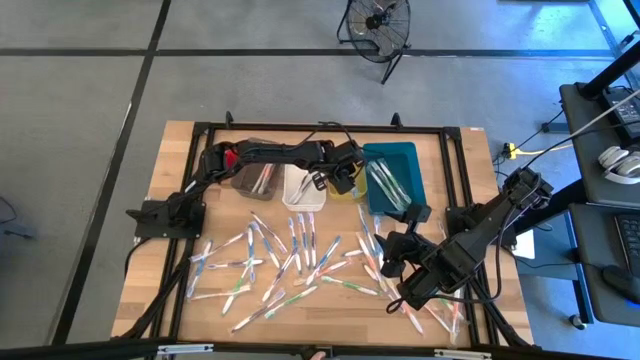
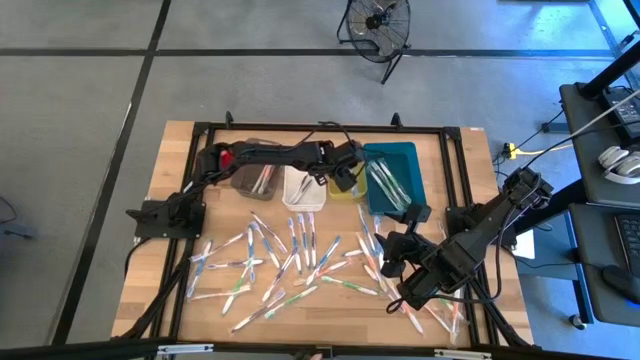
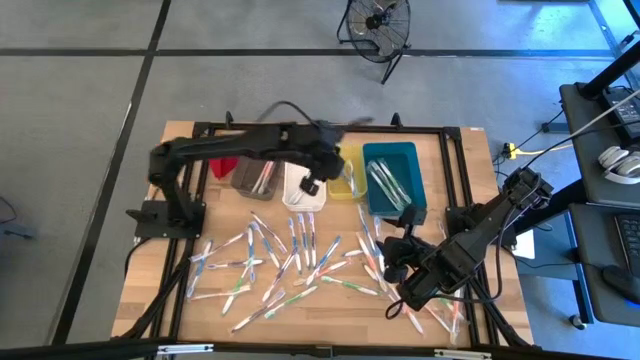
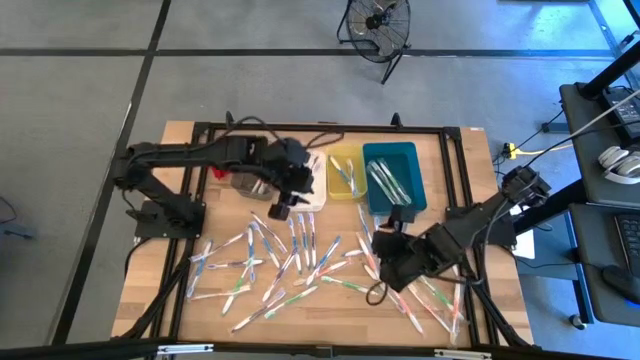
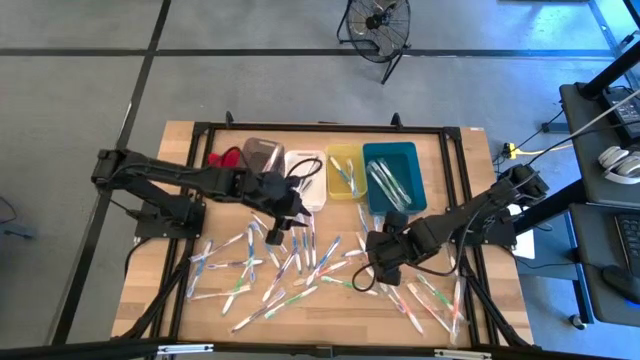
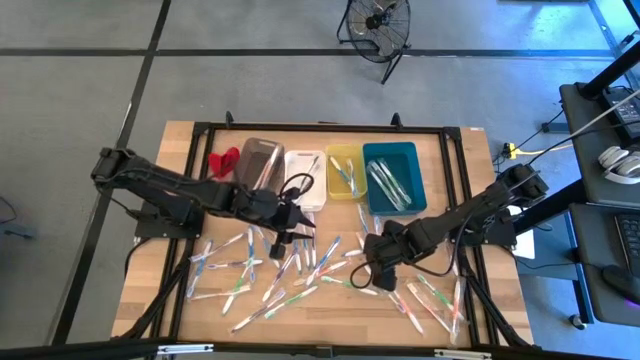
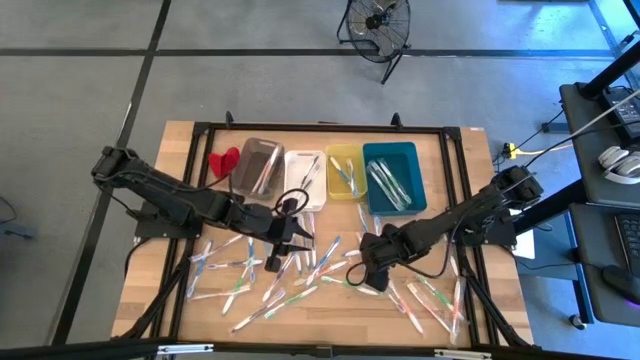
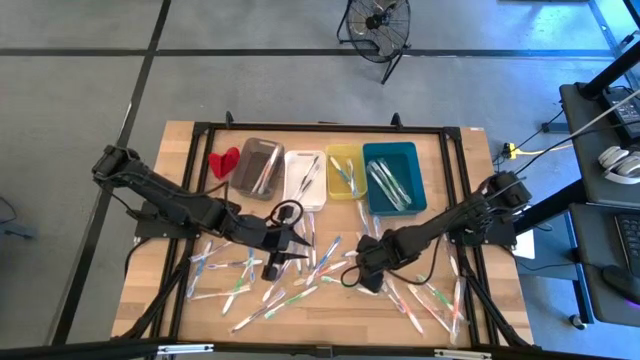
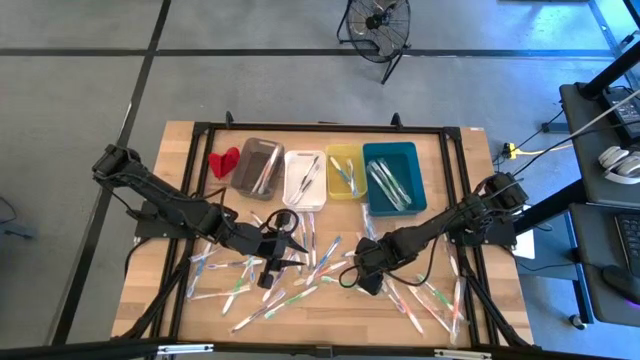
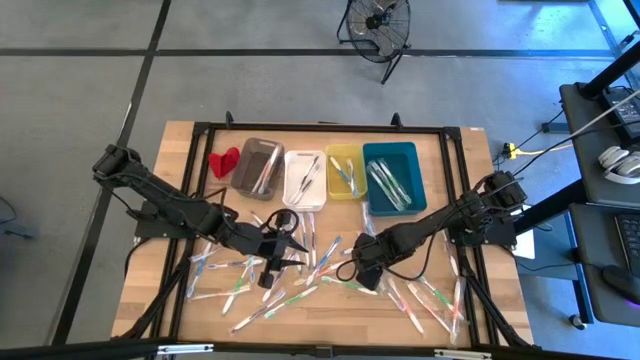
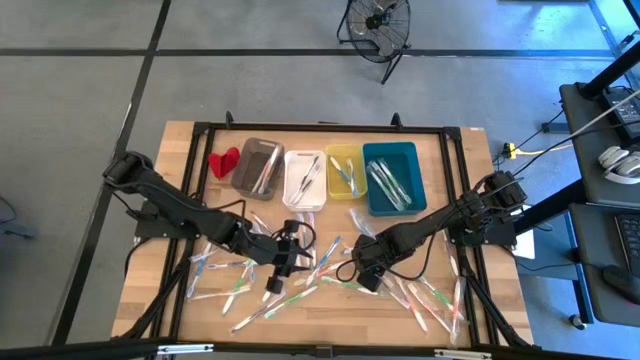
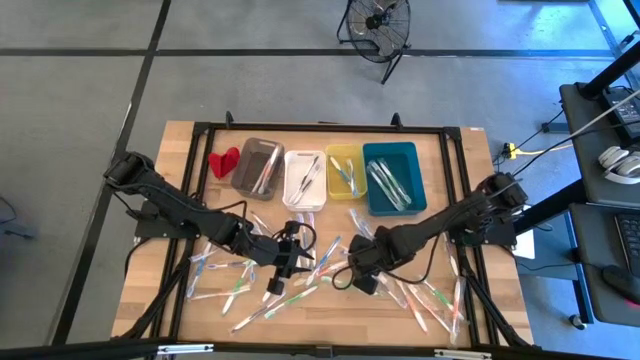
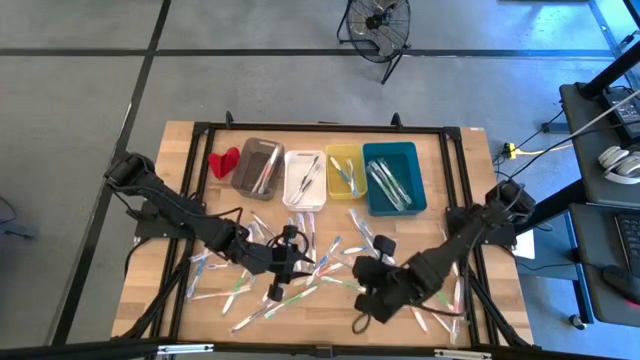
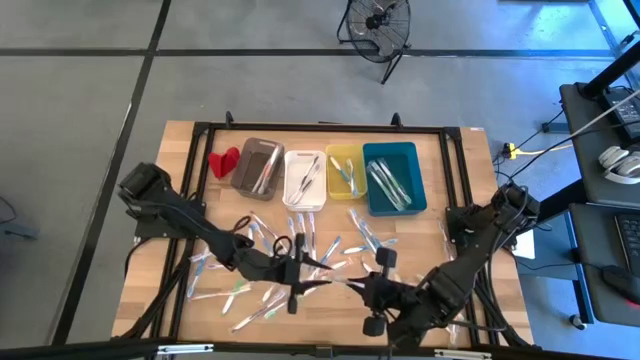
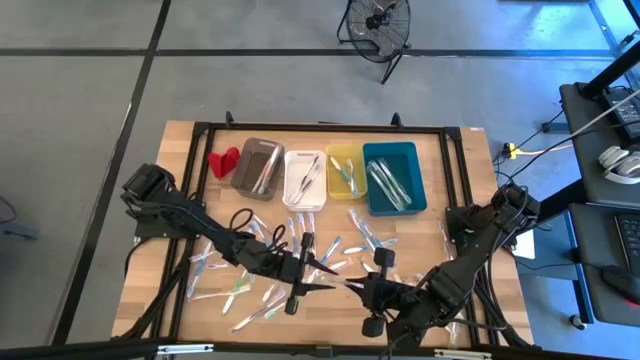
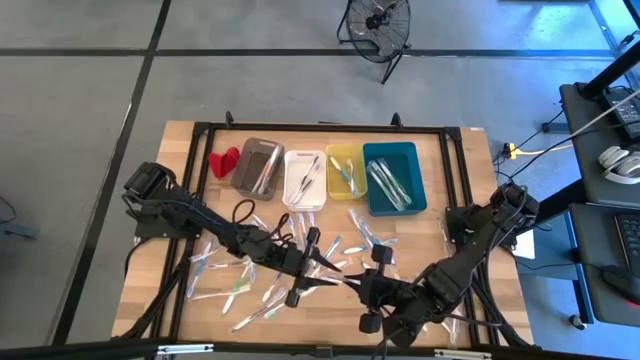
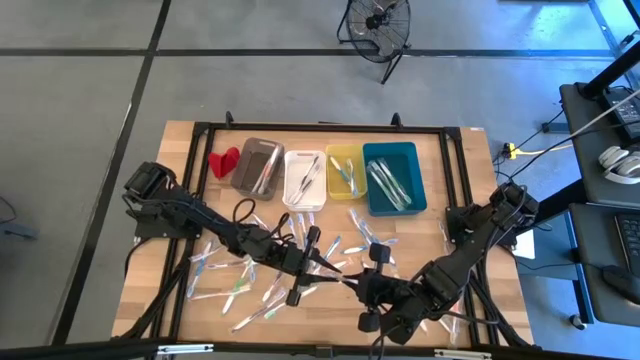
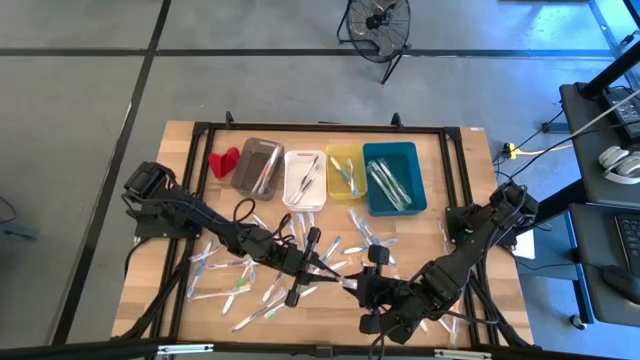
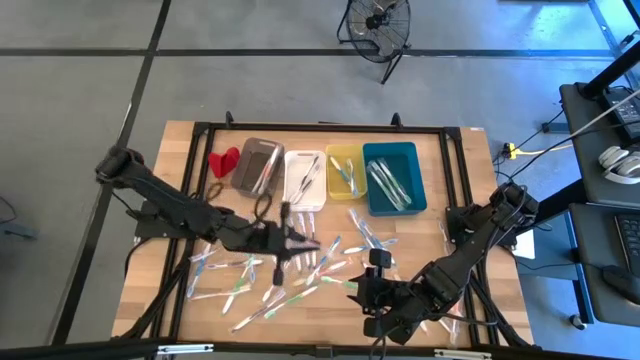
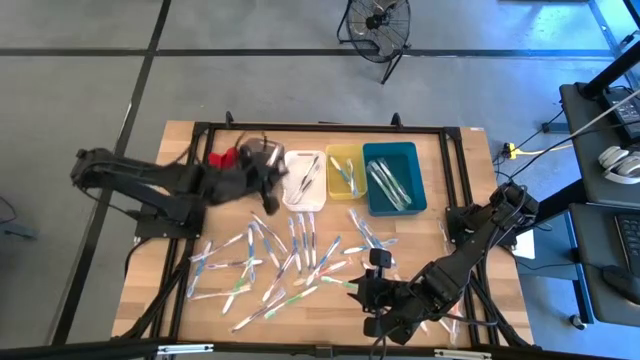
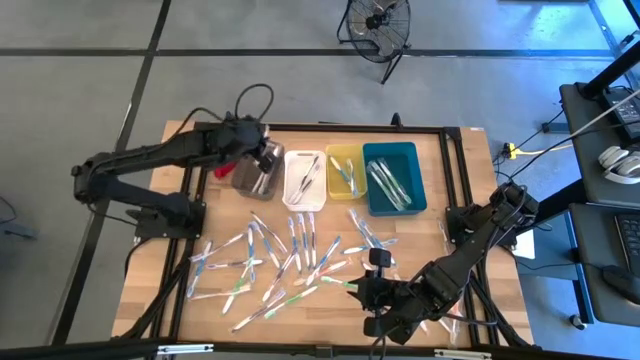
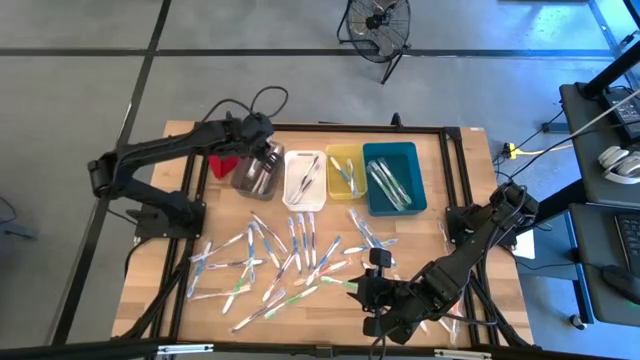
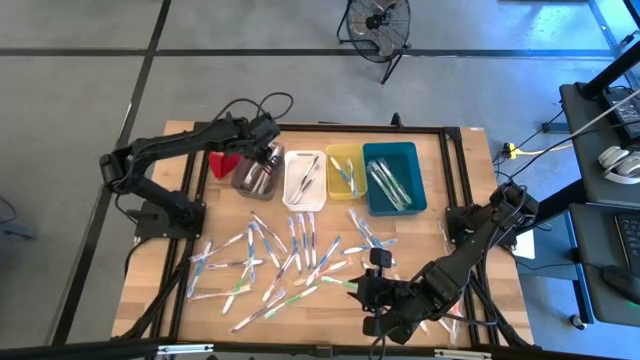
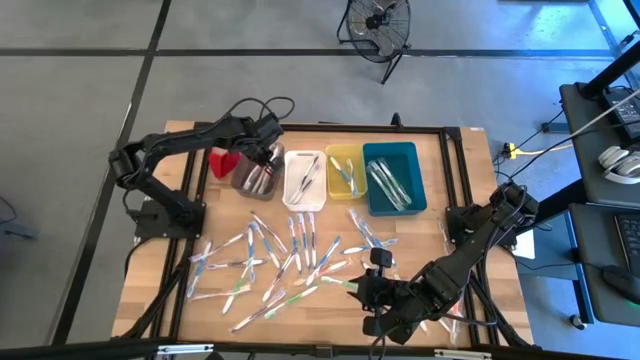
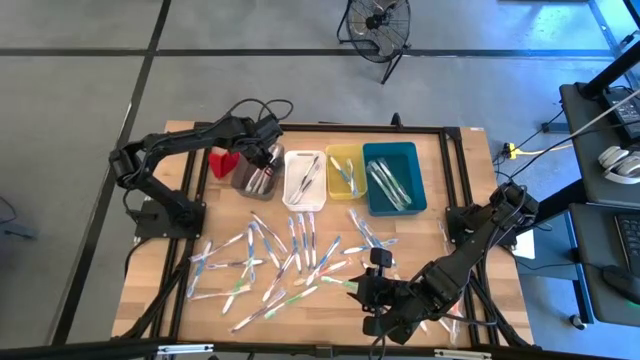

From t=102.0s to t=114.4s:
Task: Pick & Place Toothbrushes
Put the orange toothbrush into the black bin

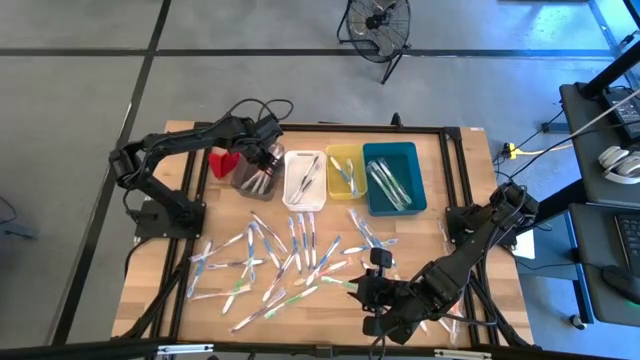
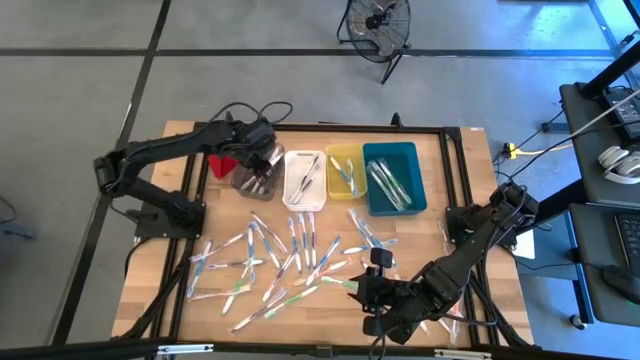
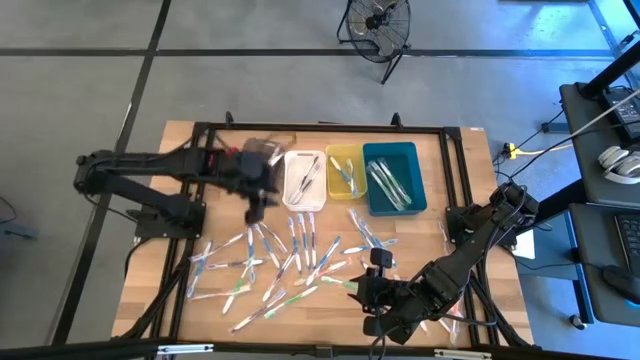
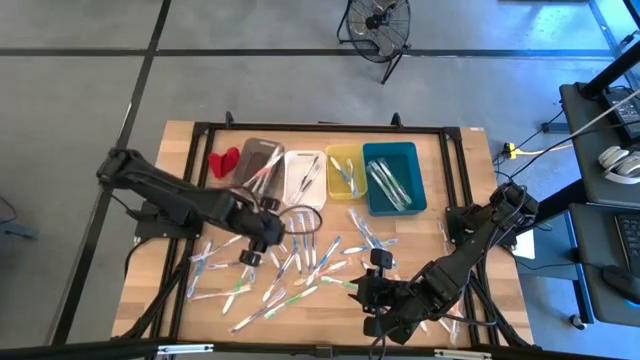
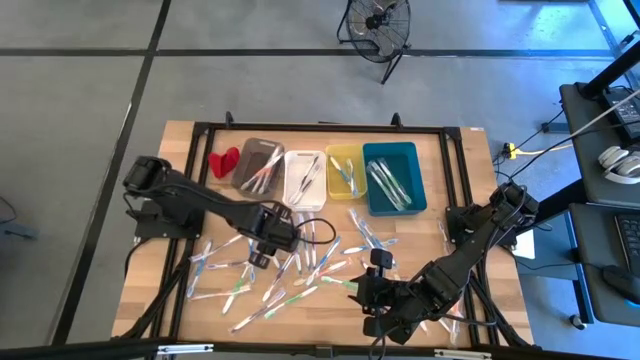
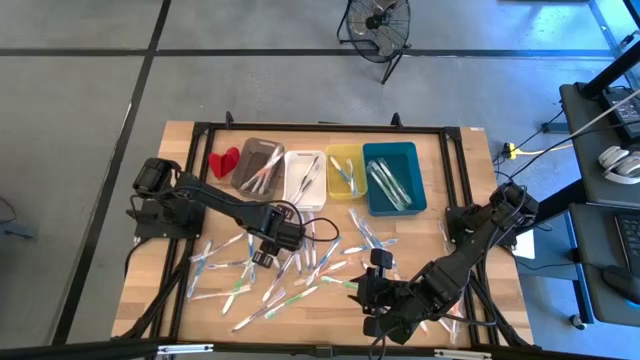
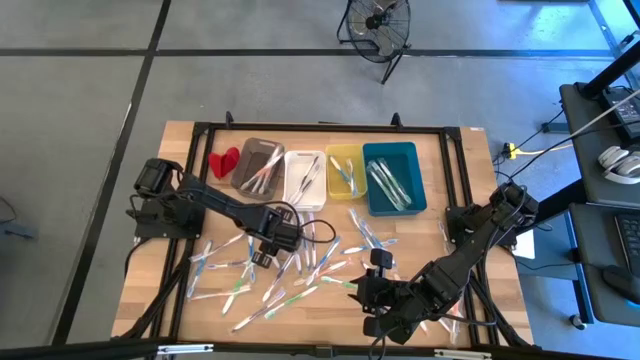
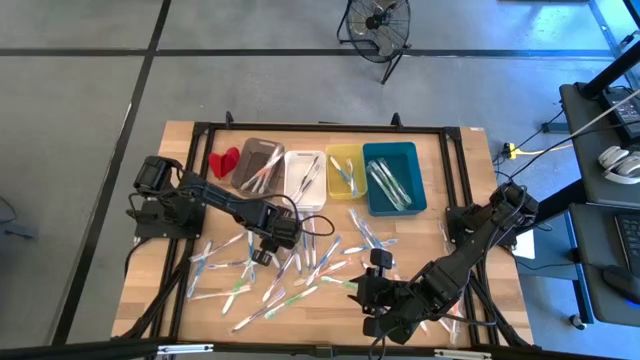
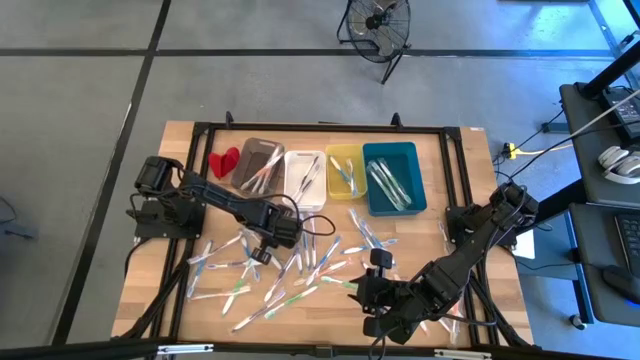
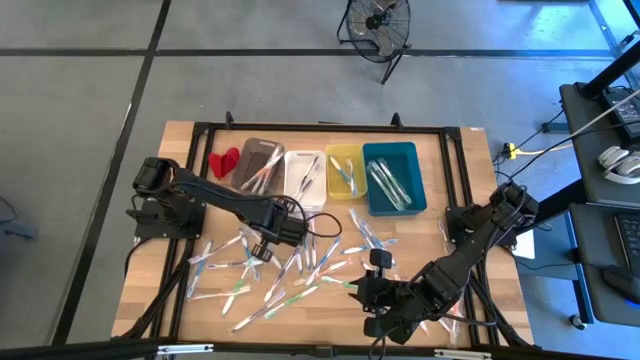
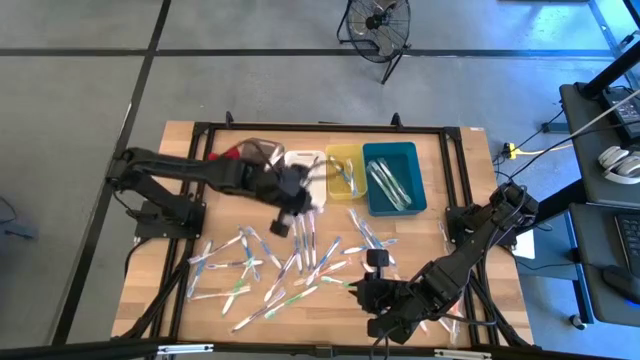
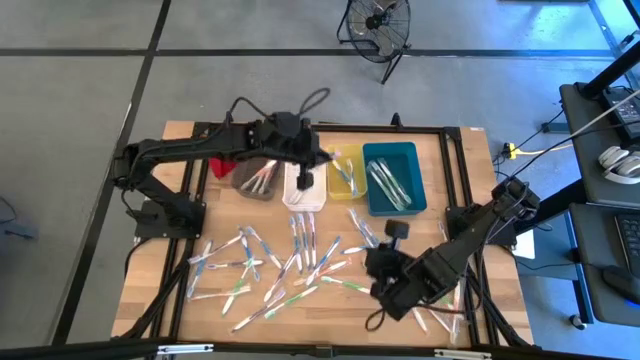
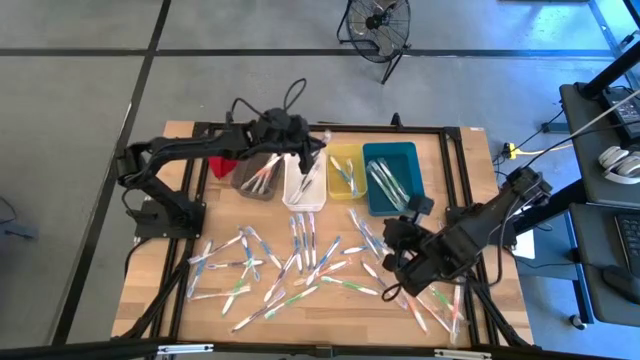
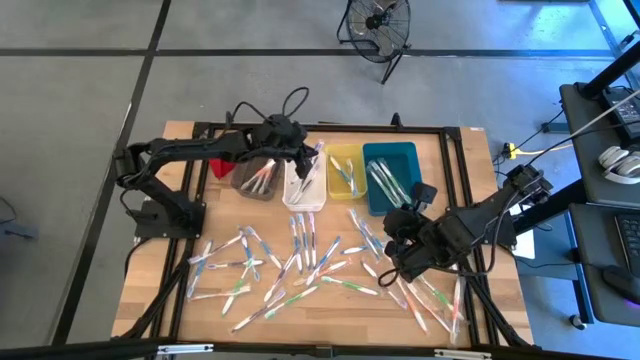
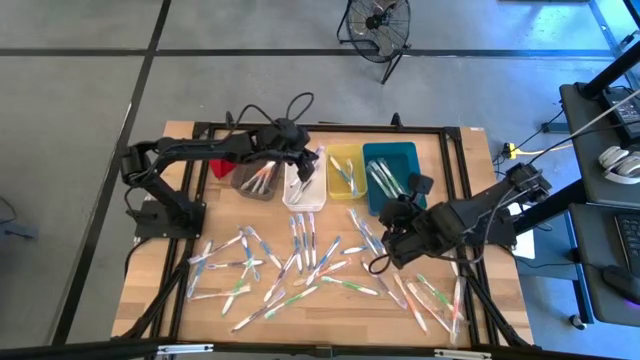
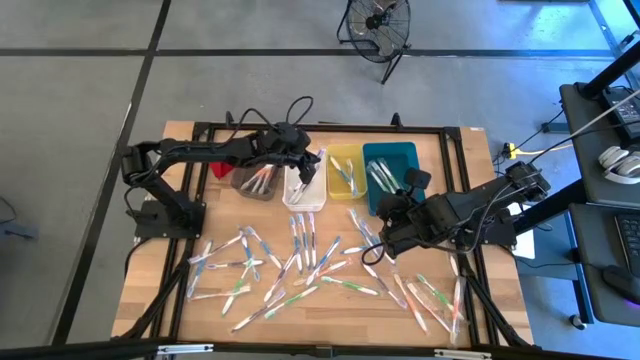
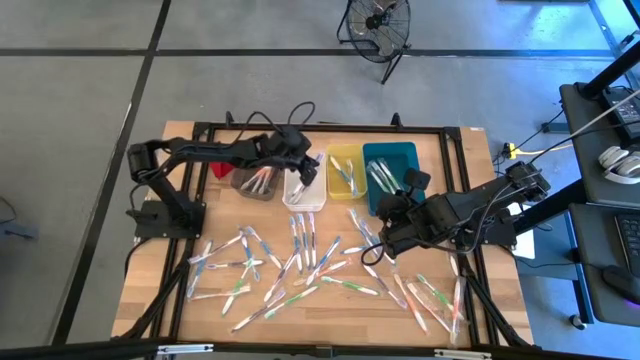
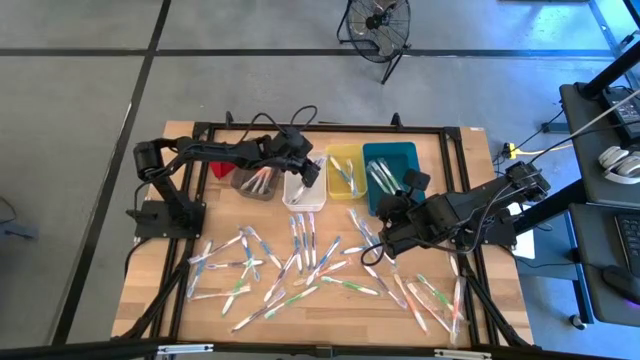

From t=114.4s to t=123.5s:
Put the purple toothbrush into the white bin
